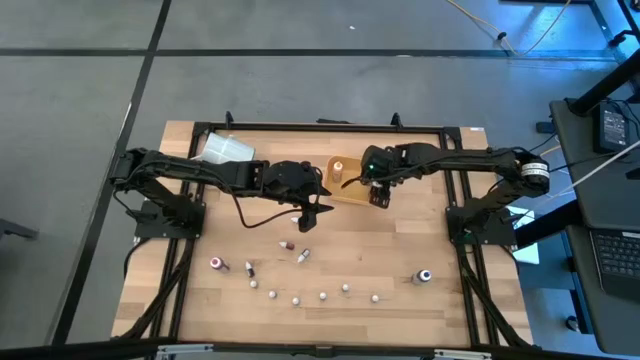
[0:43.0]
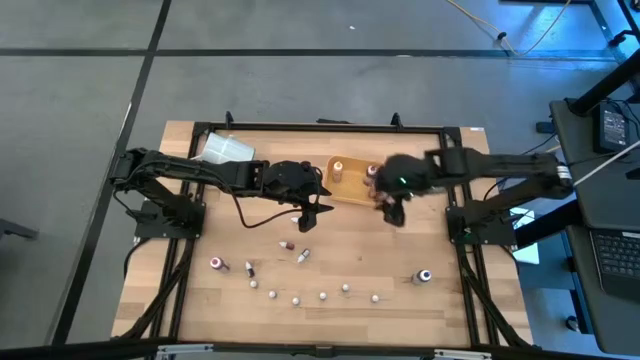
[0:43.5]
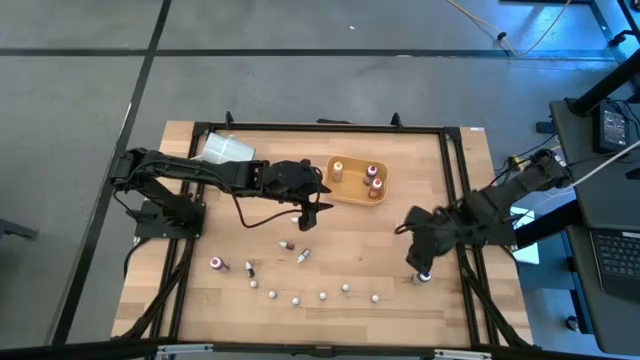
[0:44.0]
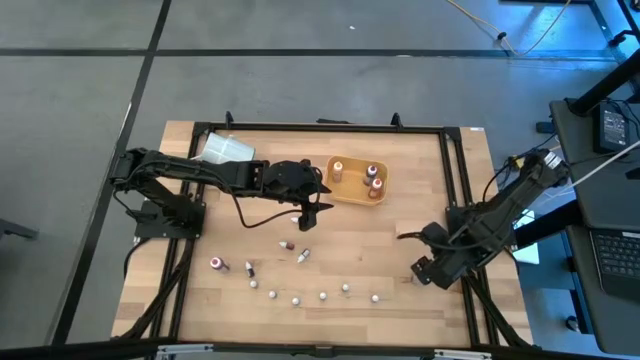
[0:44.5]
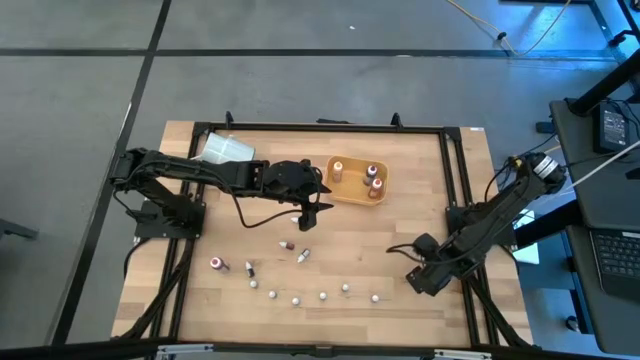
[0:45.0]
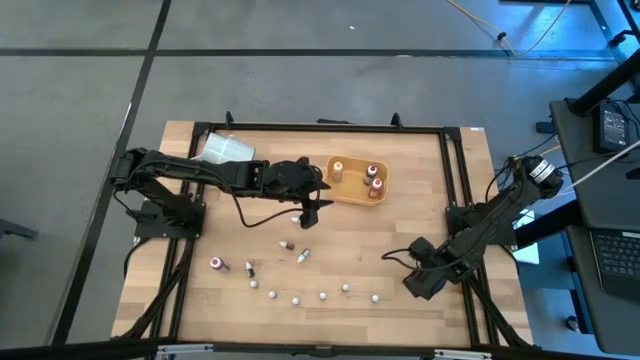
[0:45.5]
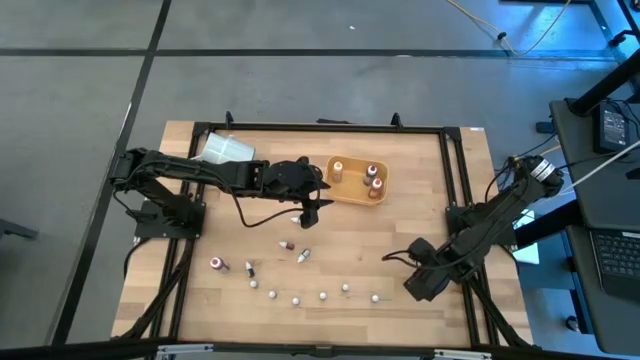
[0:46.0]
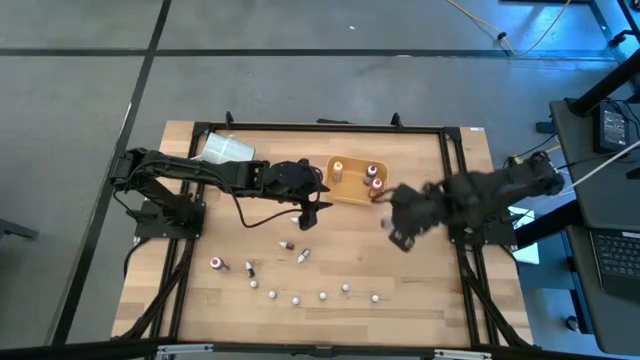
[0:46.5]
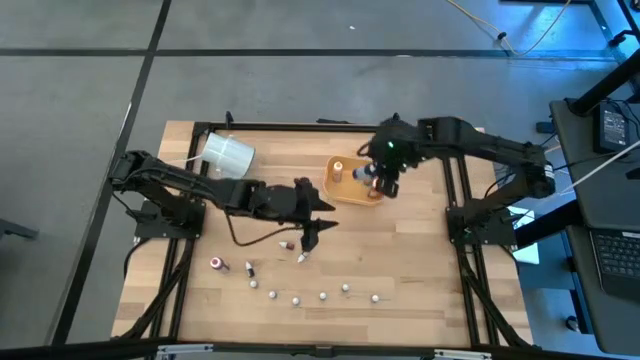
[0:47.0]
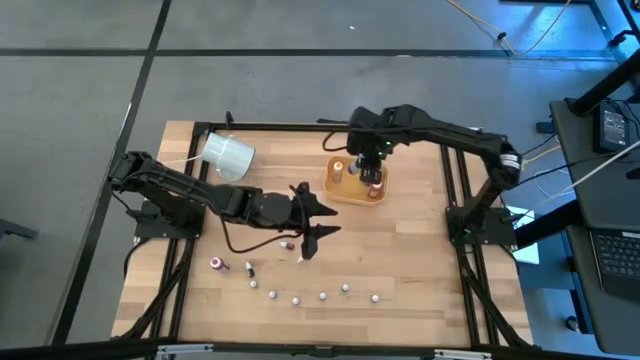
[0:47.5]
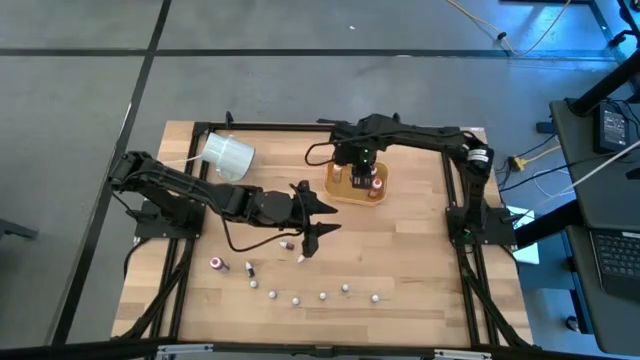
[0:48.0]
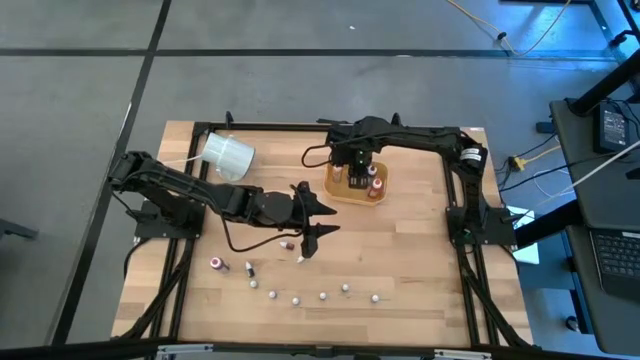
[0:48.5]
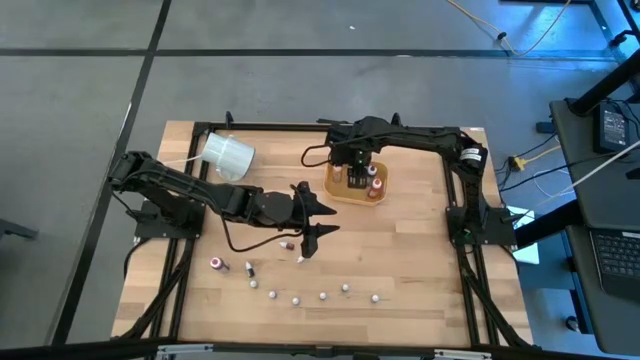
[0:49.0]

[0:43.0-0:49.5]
Task: Pick & Place food coloring
Put the large blue food coloring bottles into the yellow bin

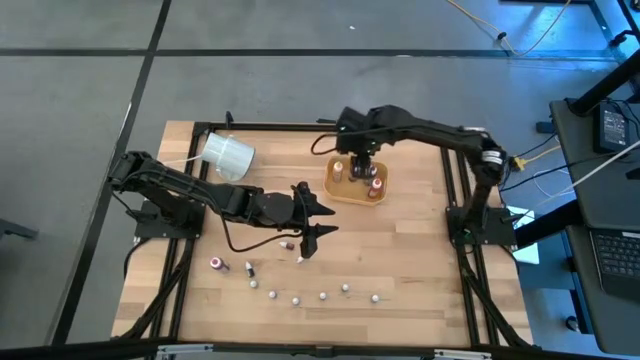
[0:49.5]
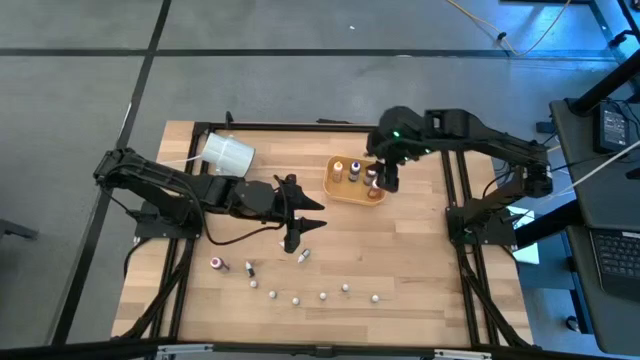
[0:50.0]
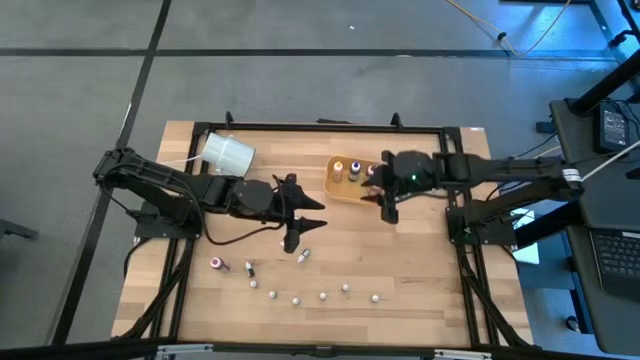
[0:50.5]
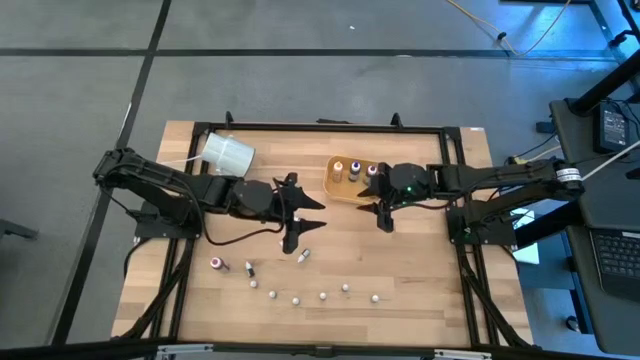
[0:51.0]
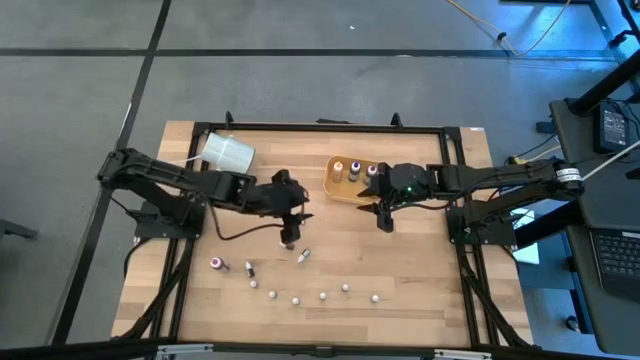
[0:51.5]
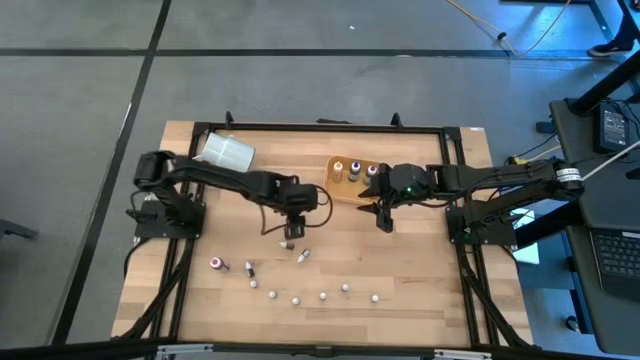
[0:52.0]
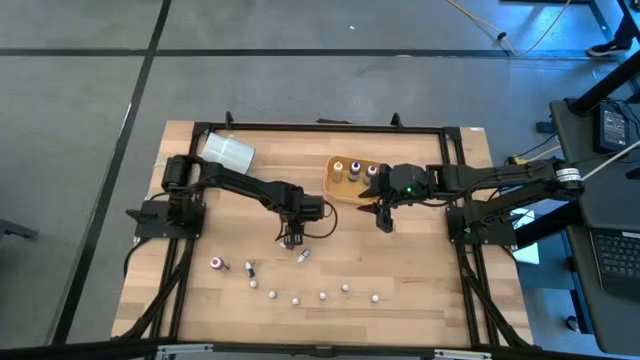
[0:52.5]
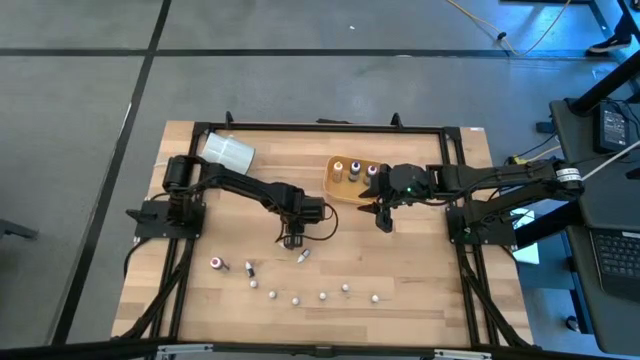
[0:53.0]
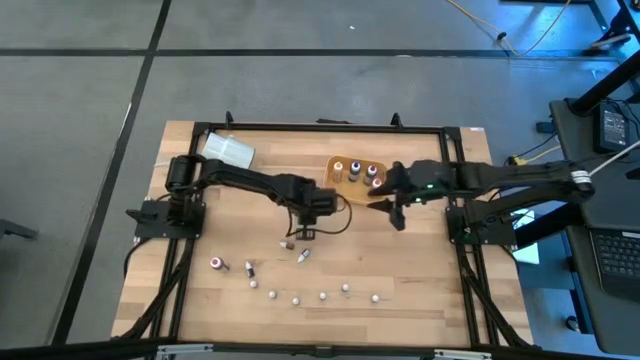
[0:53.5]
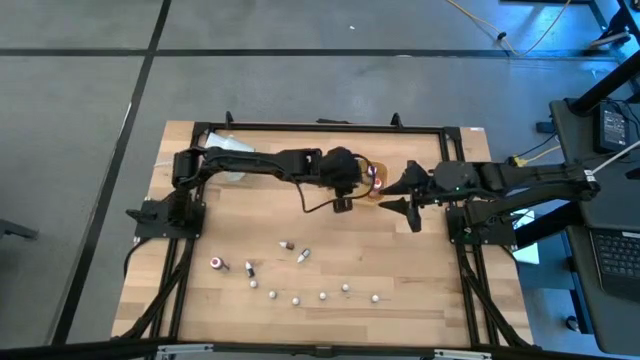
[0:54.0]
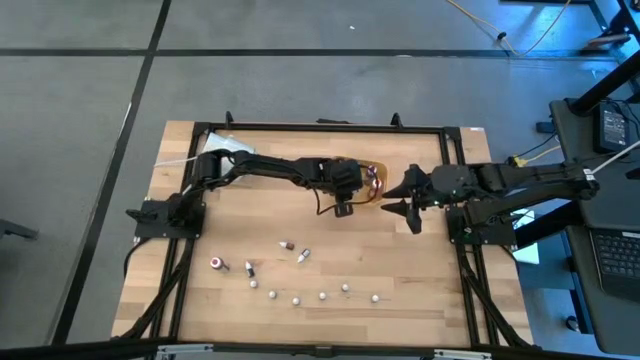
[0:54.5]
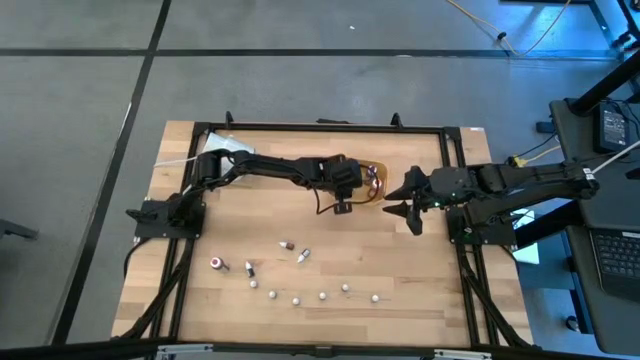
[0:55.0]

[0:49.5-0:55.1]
Put the small violet food coloring bottle into the yellow bin

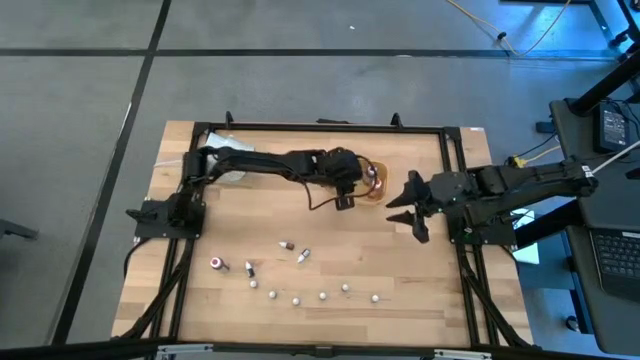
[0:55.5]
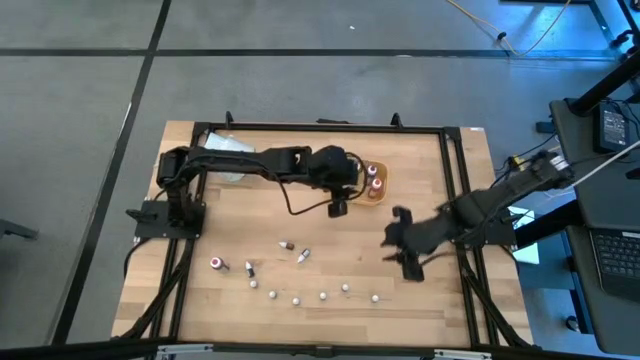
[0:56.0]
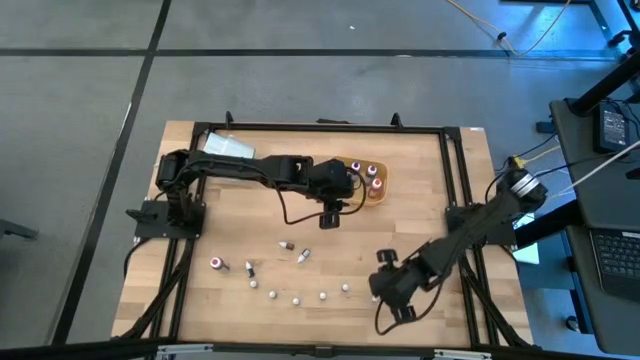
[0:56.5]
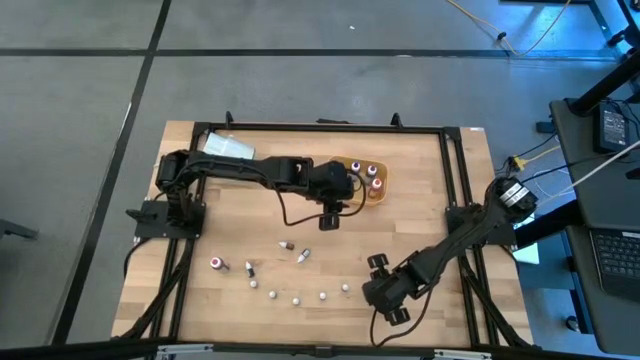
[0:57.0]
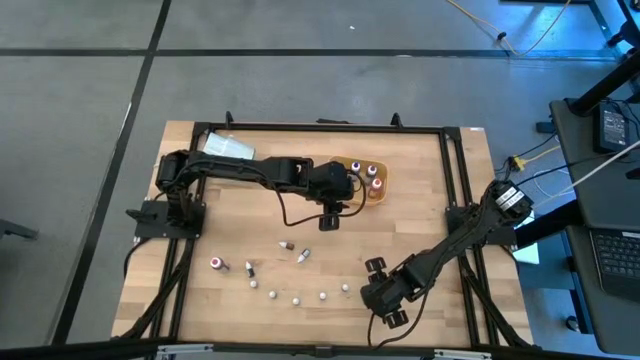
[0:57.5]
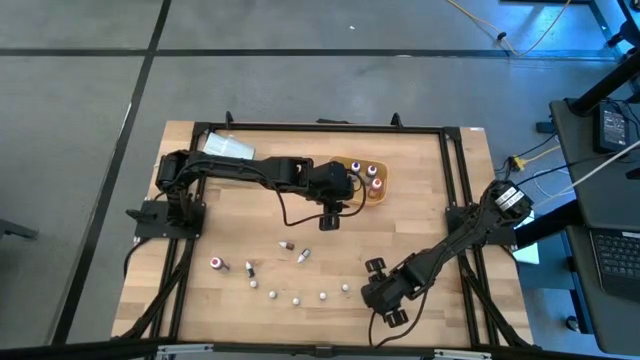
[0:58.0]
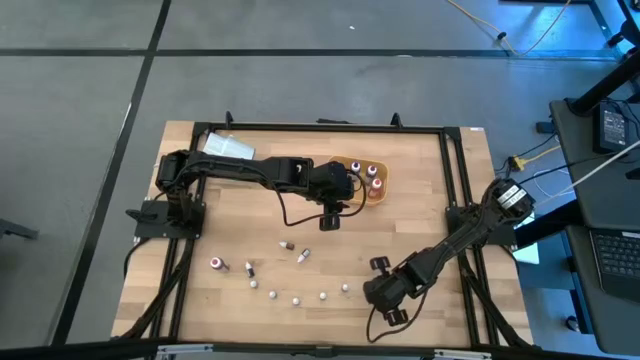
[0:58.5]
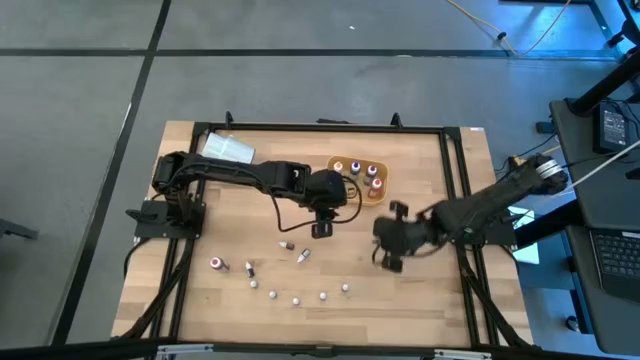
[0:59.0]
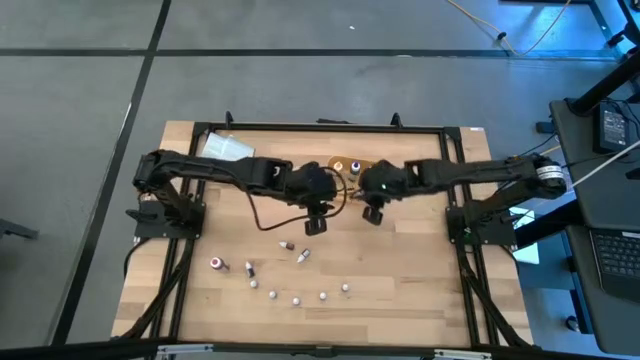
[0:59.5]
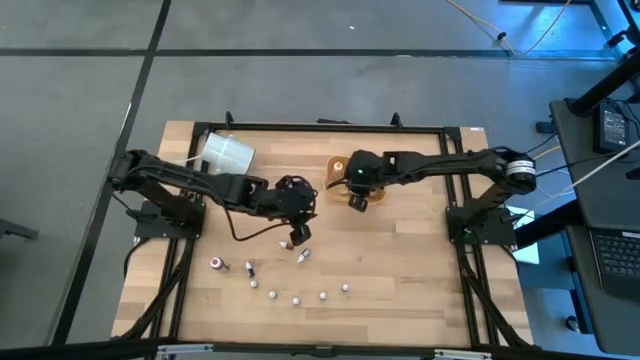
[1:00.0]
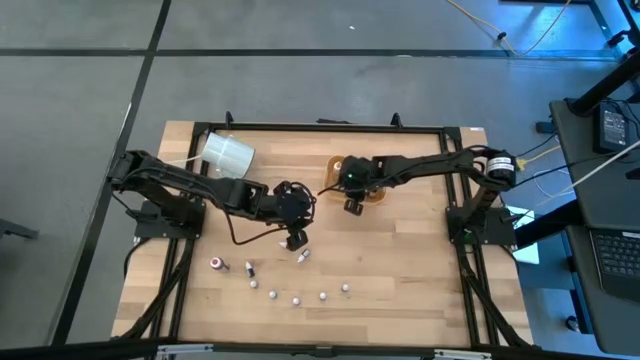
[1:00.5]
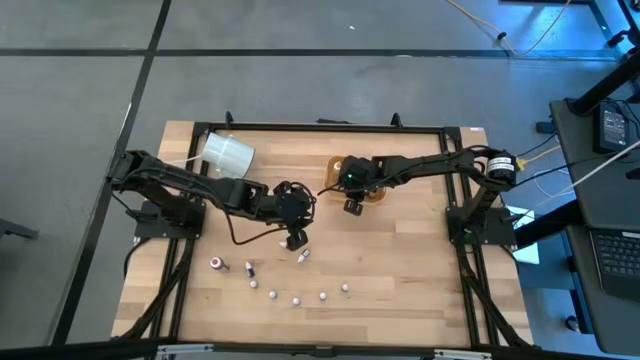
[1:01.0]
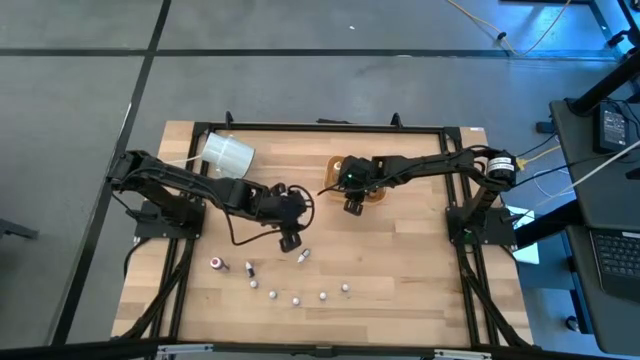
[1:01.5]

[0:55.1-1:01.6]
Put the small green food coloring bottle into the yellow bin

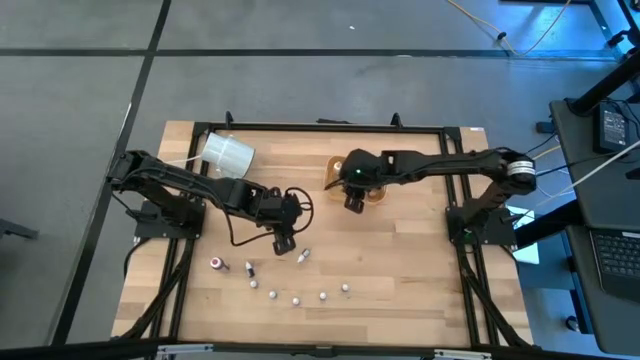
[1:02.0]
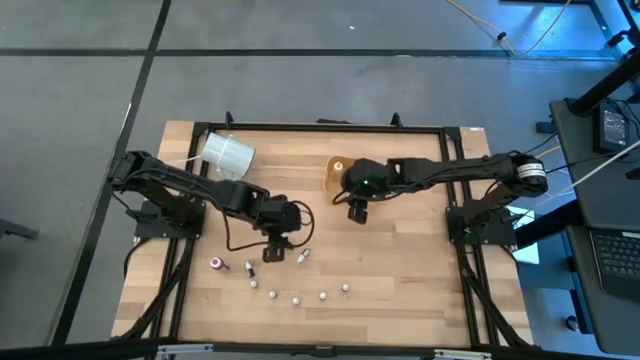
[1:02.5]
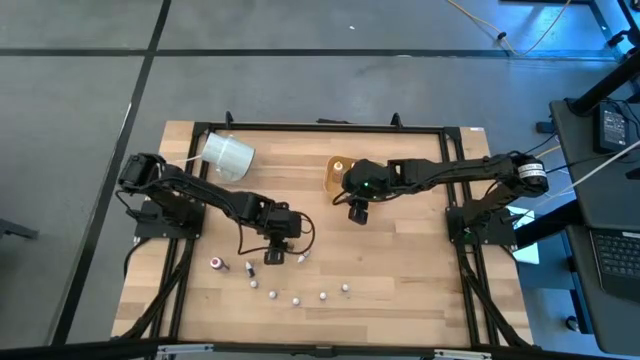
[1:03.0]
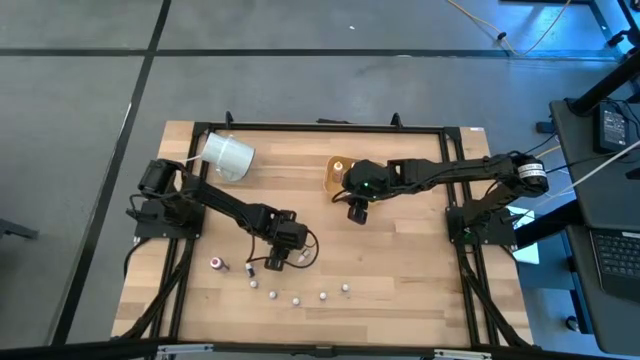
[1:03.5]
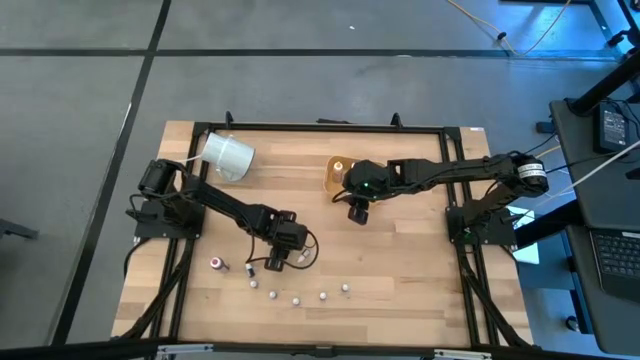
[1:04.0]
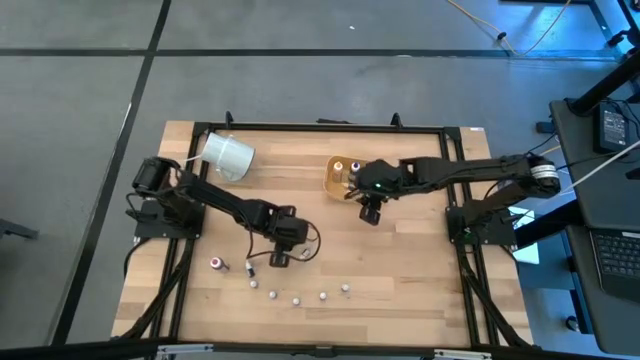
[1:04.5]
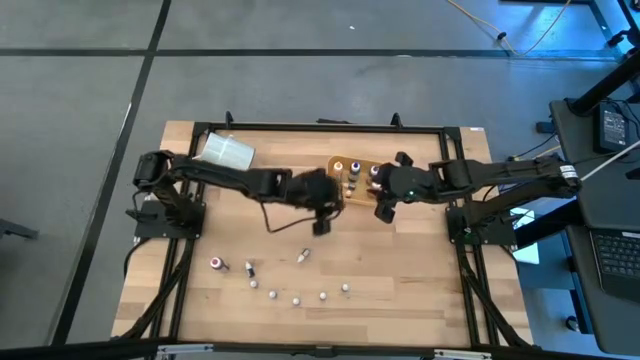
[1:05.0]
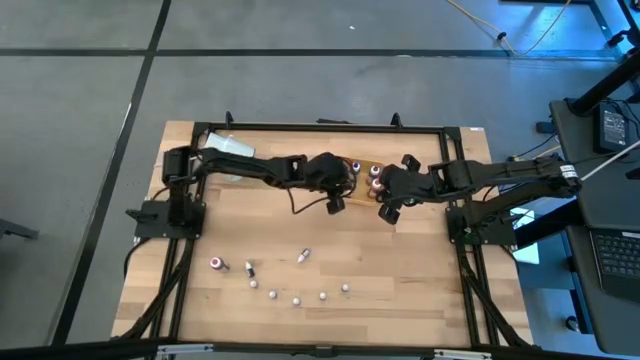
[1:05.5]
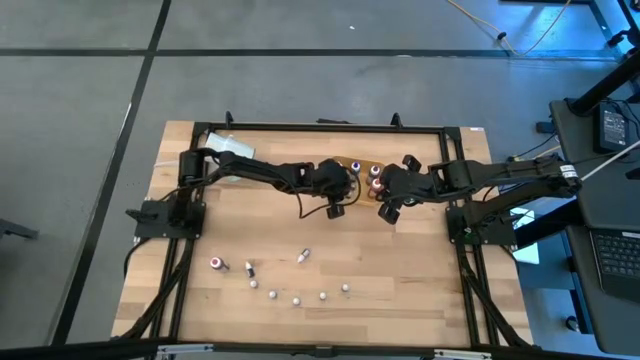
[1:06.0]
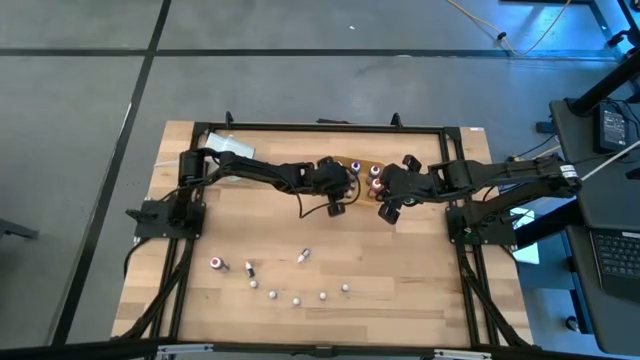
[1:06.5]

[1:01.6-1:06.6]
Put the small red food coloring bottle into the yellow bin
